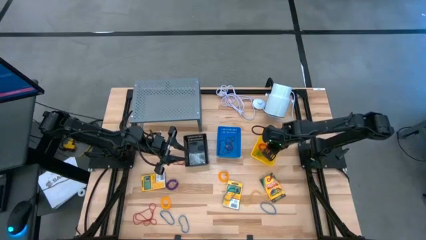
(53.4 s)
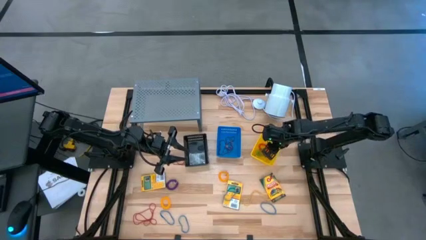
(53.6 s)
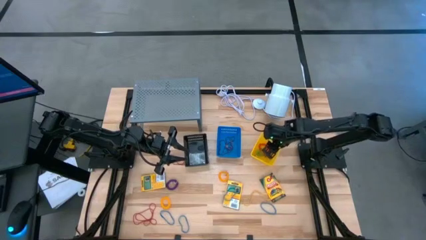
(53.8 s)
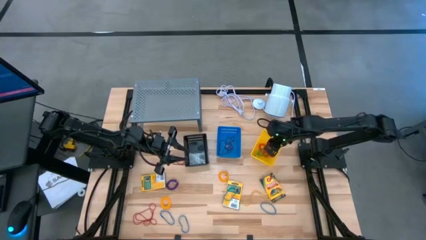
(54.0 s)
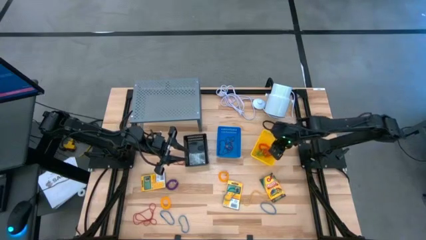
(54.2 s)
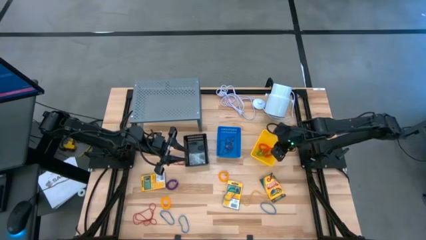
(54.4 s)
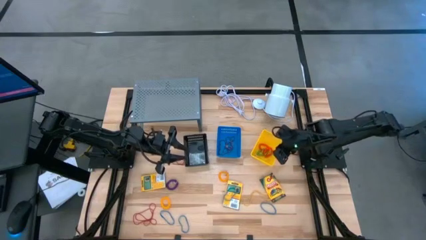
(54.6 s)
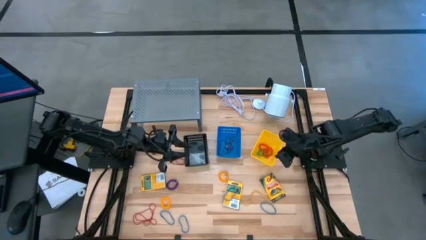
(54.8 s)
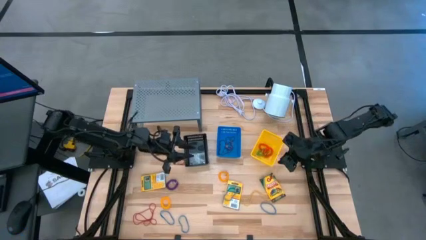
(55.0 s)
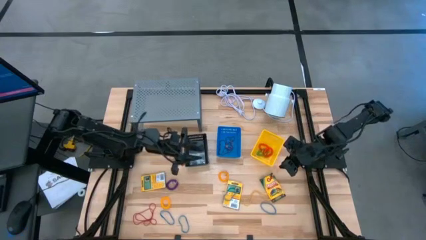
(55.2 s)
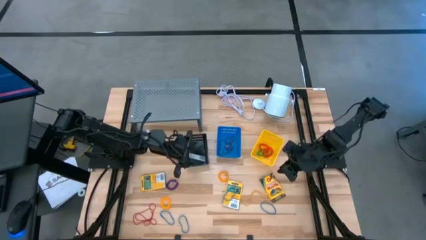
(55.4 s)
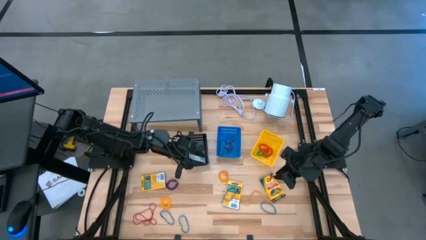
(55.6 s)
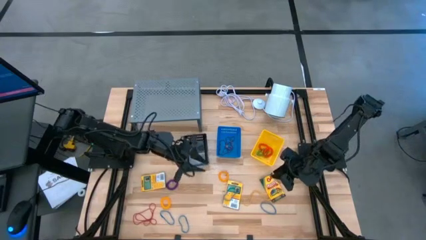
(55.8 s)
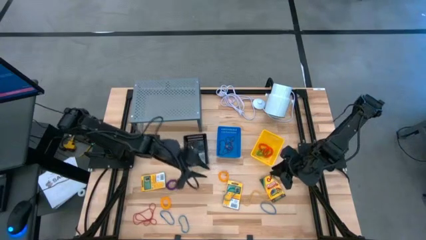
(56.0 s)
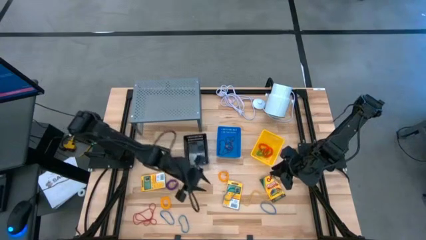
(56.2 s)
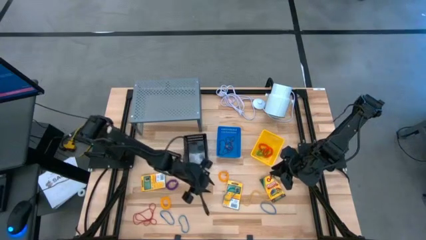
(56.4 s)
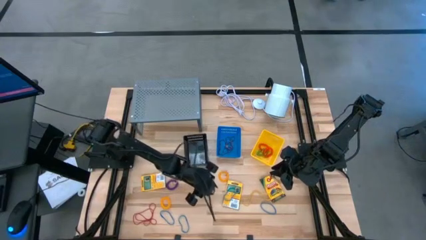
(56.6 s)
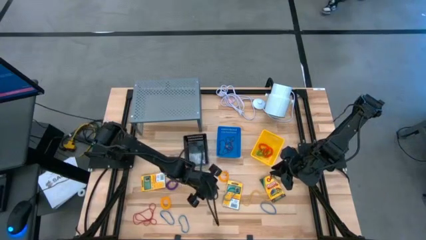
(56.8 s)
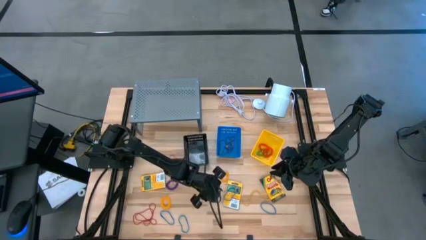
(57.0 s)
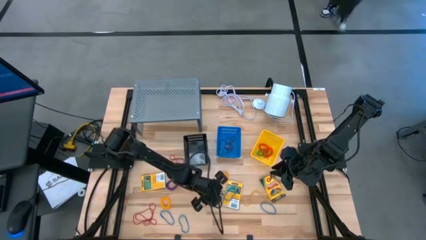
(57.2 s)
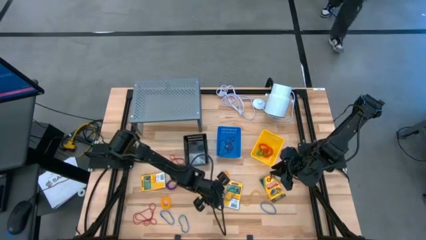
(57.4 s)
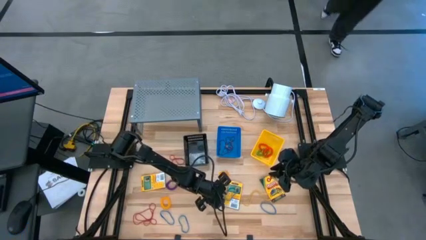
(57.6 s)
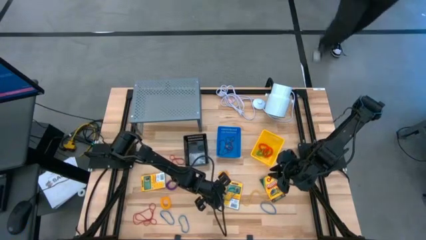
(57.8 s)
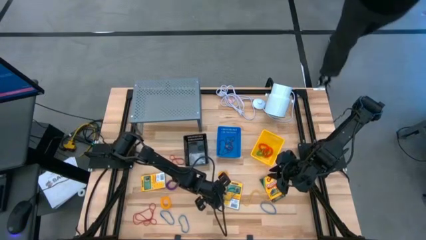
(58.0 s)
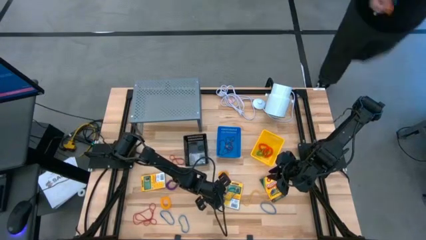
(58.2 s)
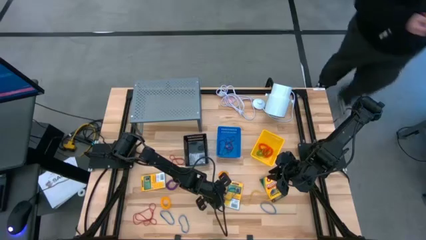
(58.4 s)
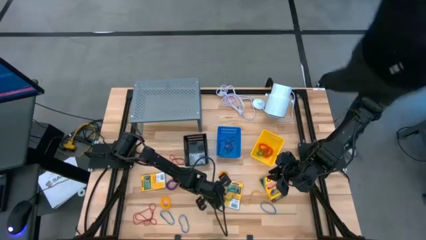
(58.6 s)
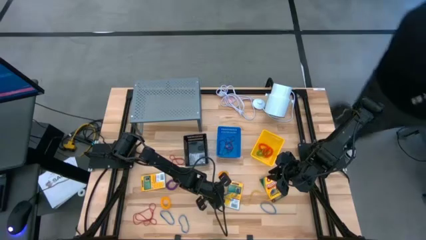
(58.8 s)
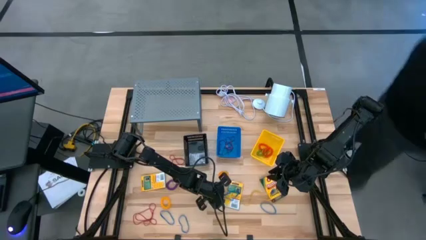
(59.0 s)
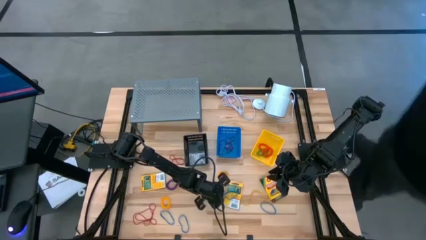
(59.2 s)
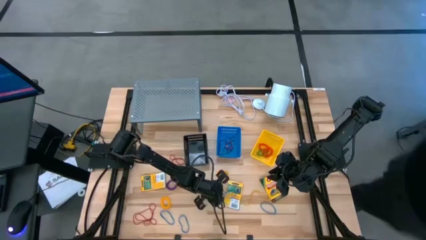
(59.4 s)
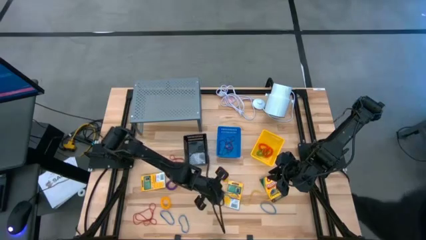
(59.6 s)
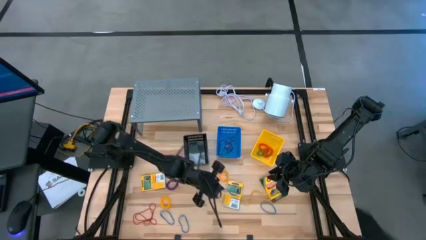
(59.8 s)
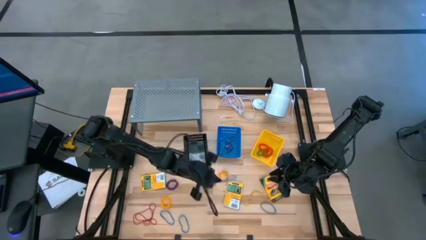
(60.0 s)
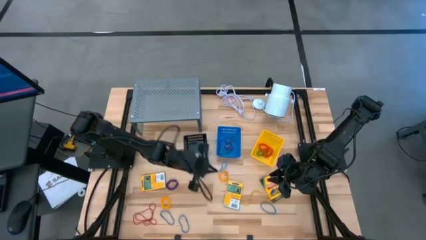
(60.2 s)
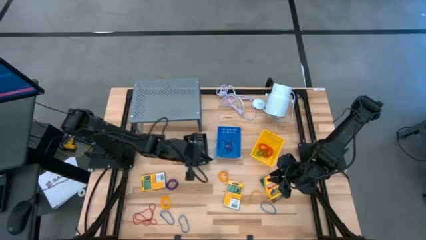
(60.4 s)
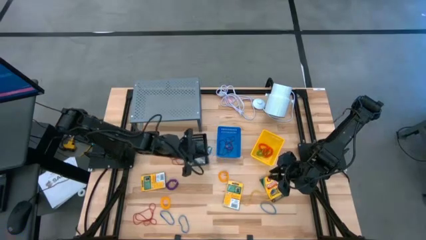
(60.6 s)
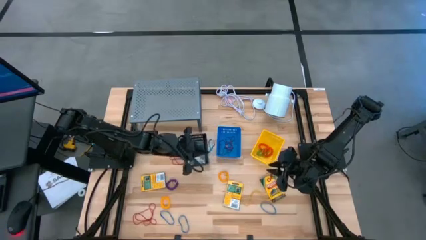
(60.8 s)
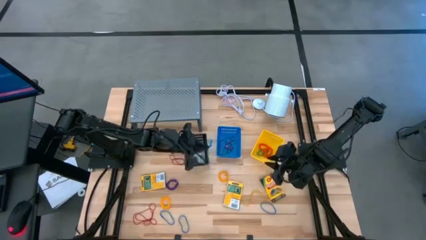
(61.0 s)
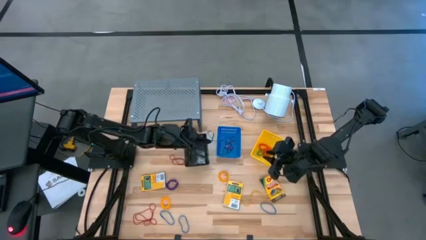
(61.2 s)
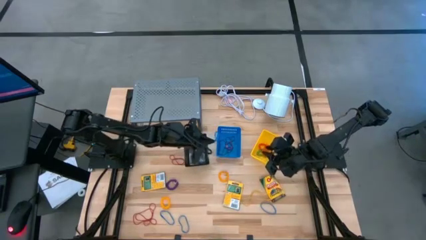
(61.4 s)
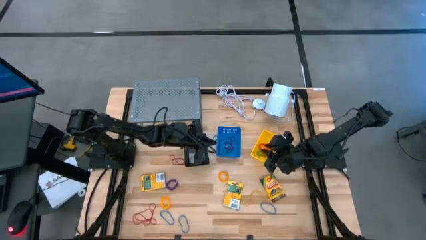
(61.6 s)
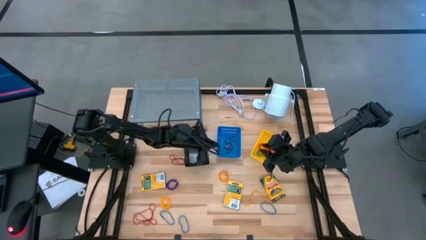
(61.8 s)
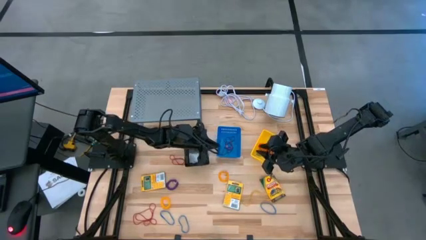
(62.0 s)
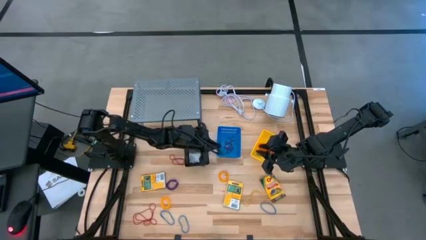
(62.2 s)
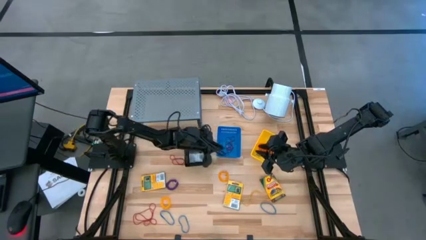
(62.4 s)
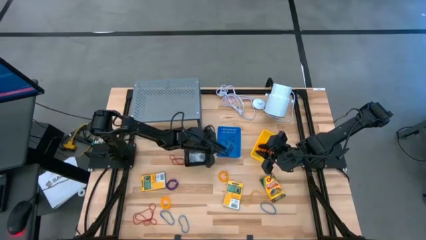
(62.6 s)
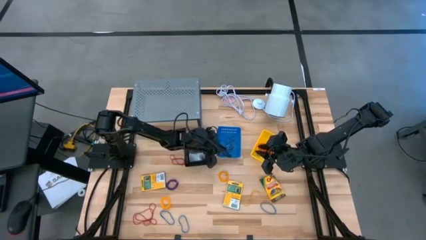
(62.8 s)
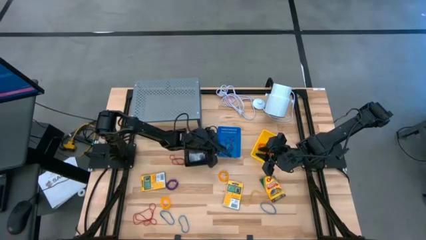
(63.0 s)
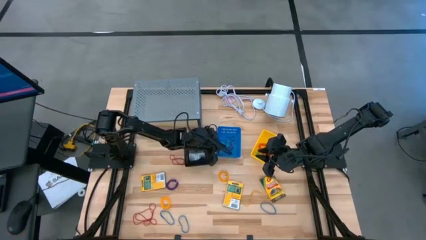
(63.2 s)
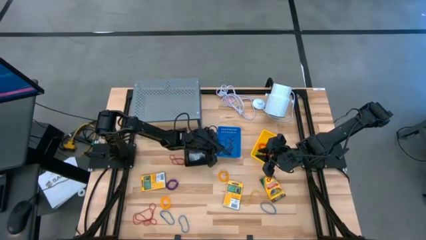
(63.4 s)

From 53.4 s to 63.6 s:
Task: Pick & Place Office Desk Supplies
Put the blue rubber band into the blue basket
